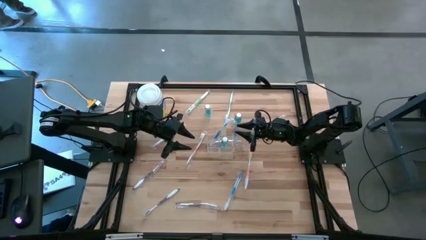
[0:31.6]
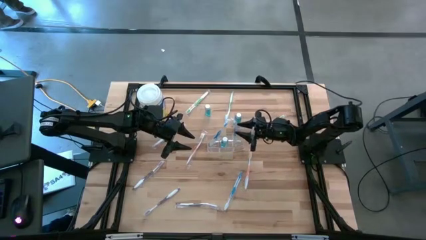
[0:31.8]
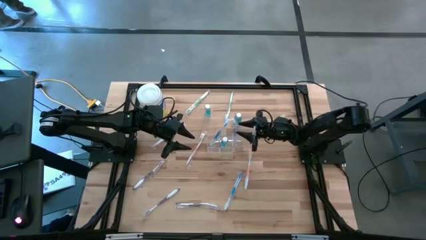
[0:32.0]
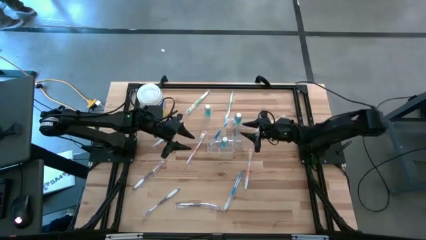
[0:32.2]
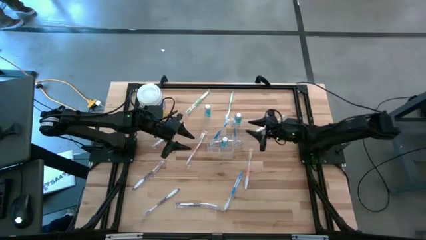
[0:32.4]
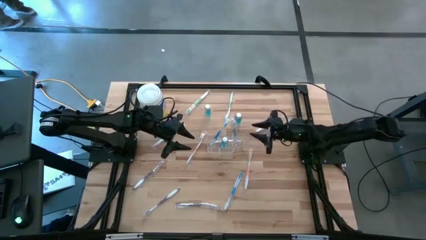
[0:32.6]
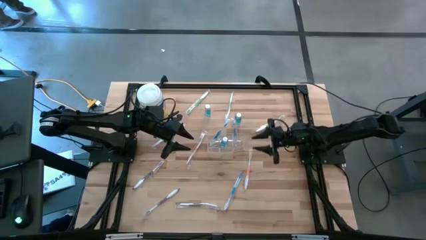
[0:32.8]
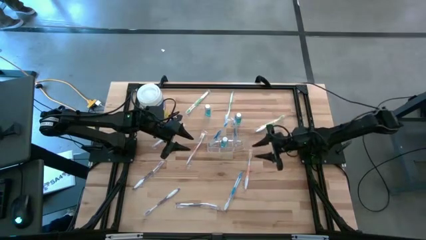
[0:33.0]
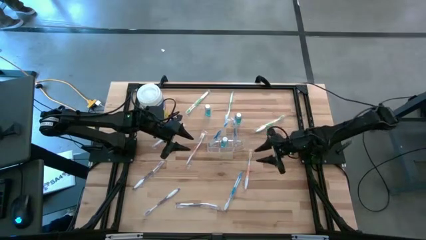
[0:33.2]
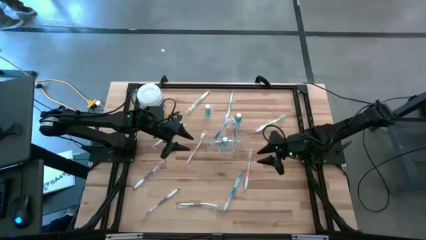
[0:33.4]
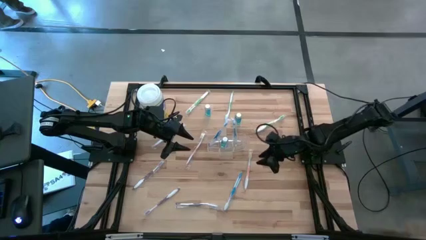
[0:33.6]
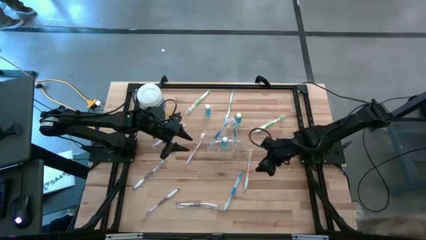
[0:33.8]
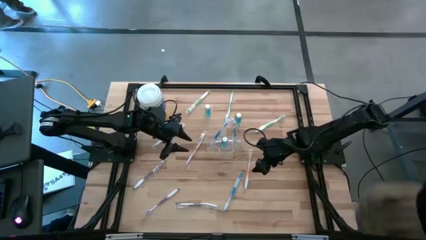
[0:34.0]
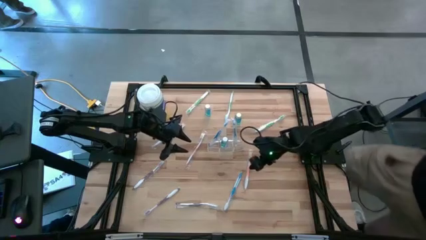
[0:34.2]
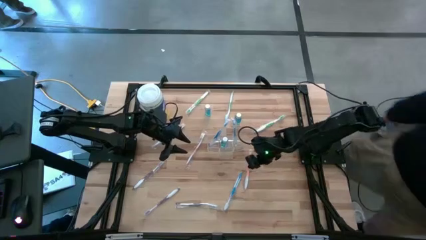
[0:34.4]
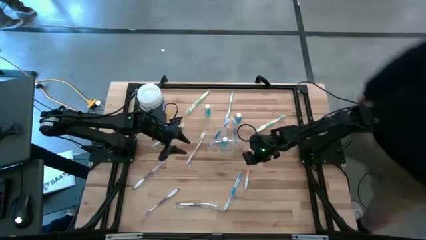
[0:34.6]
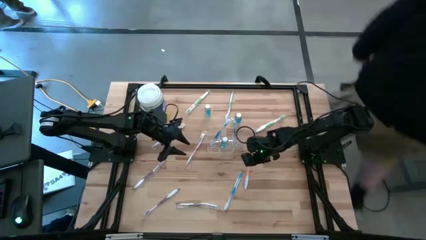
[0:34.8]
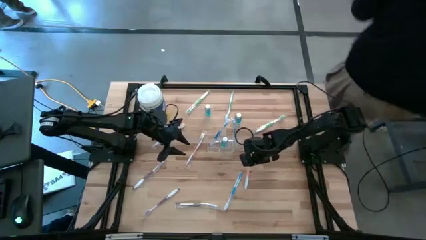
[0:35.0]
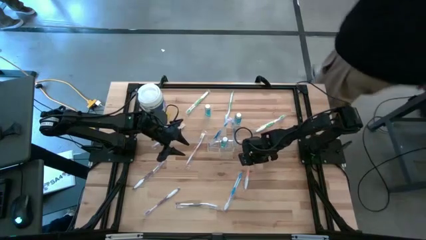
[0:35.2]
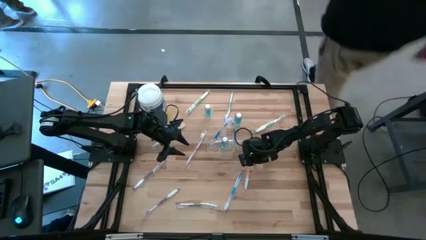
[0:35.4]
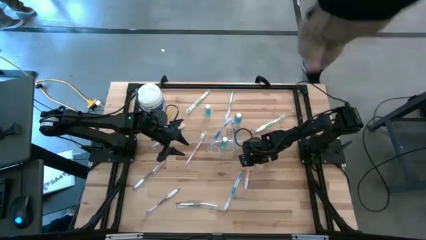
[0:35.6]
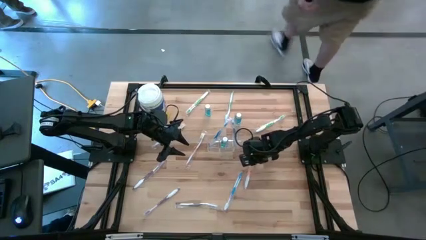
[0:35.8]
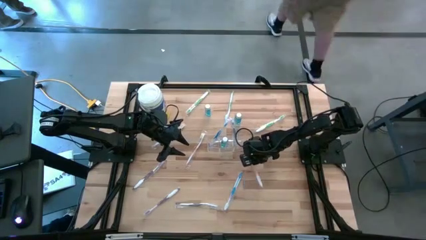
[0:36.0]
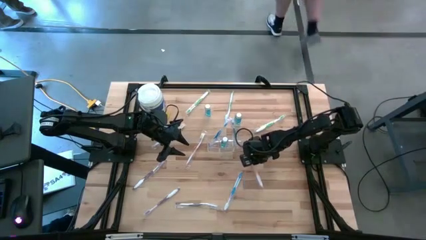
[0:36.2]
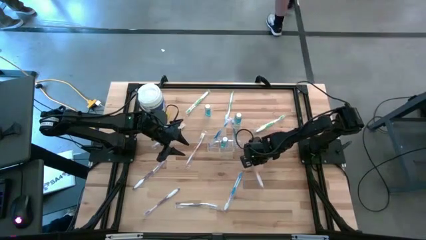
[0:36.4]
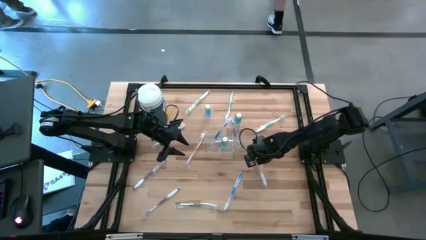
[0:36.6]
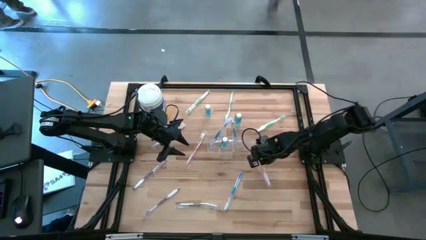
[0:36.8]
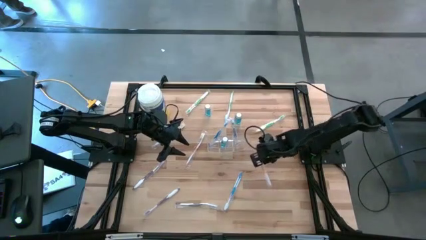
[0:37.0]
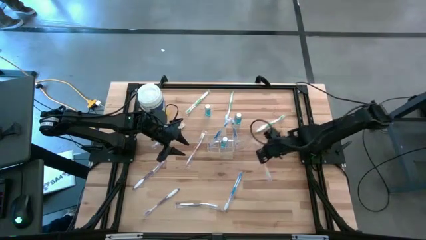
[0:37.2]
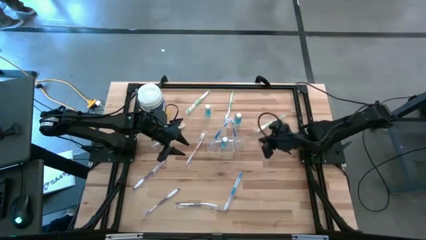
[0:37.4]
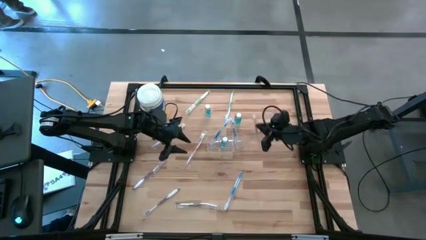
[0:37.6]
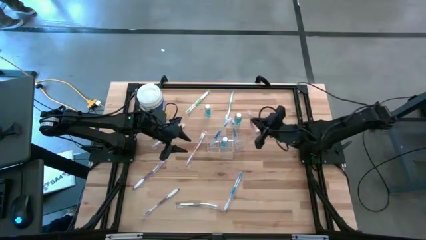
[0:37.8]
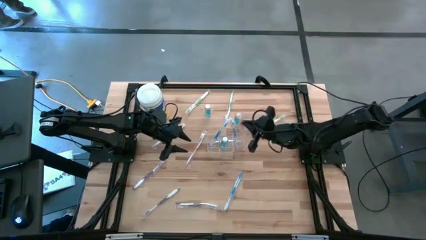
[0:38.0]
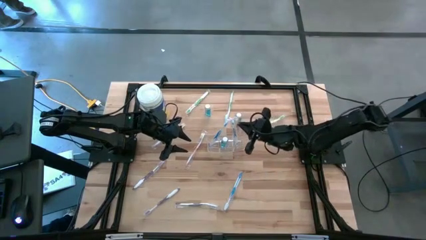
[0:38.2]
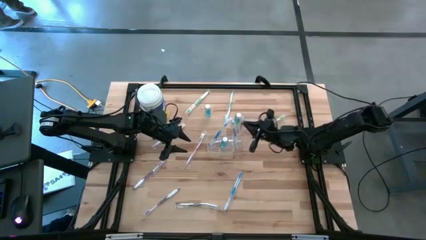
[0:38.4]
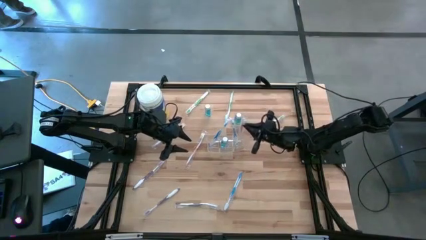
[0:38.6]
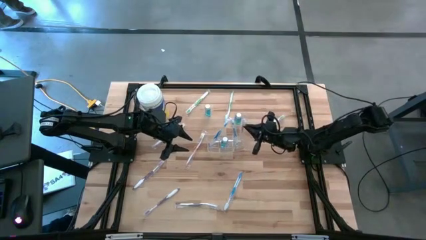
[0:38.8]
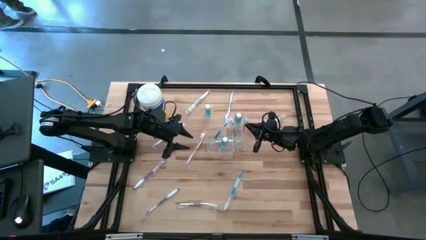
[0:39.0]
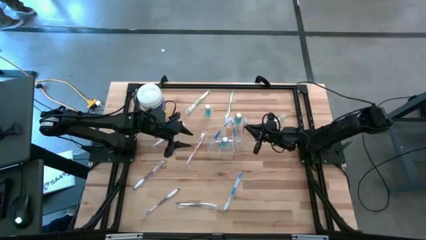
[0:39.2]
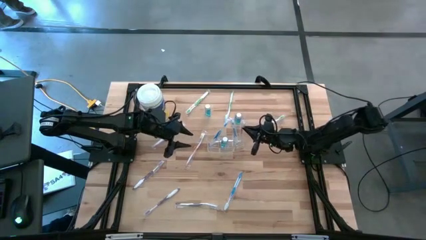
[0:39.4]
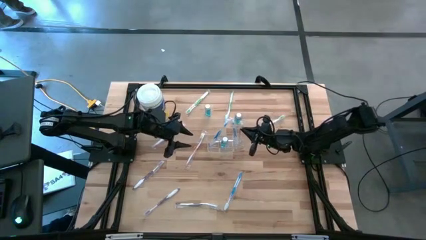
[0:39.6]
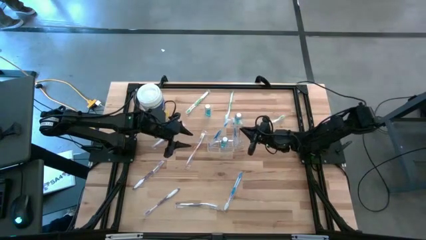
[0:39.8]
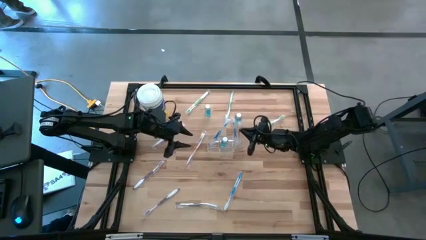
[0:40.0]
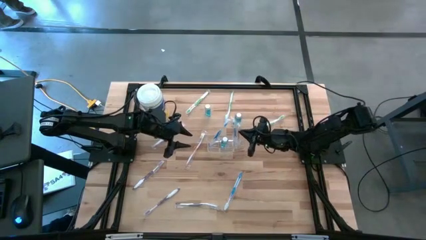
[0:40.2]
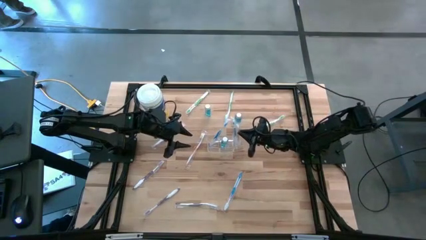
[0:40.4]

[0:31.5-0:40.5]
Task: Pick & Place toothbrushing station
Put the right orange toothbrush into the right section of the transparent organizer

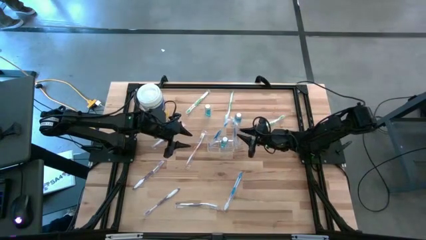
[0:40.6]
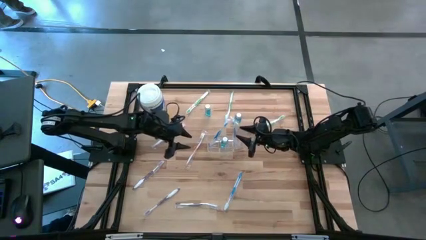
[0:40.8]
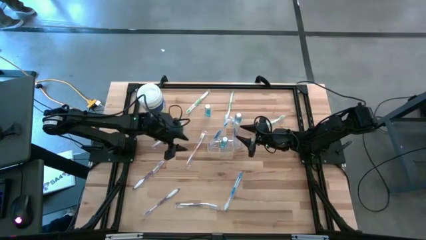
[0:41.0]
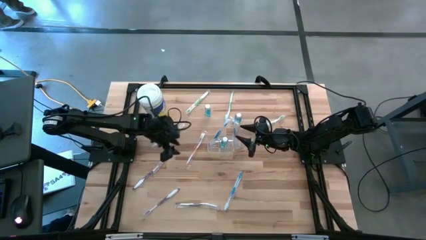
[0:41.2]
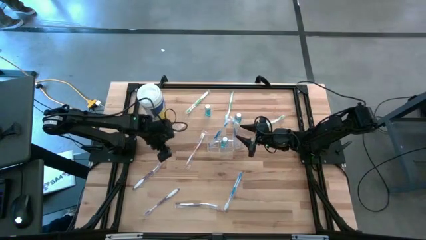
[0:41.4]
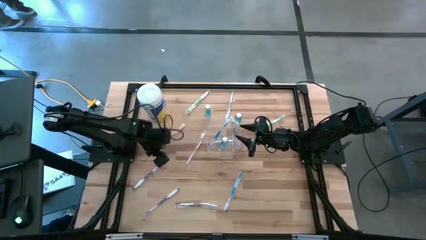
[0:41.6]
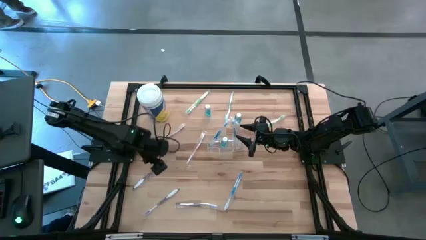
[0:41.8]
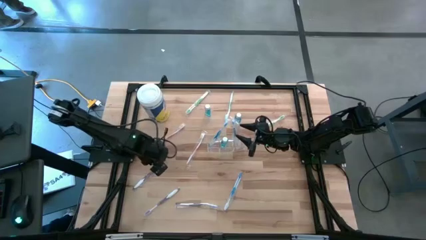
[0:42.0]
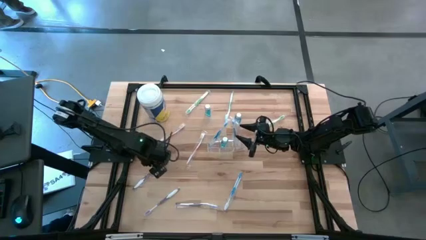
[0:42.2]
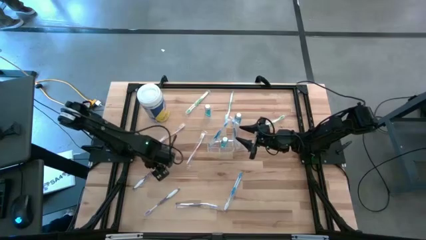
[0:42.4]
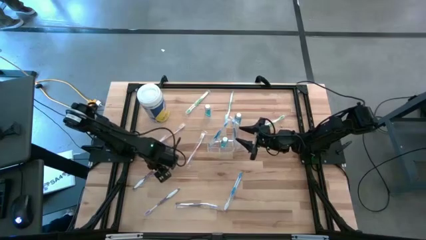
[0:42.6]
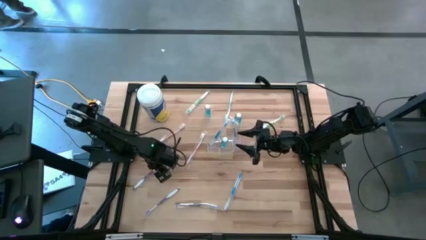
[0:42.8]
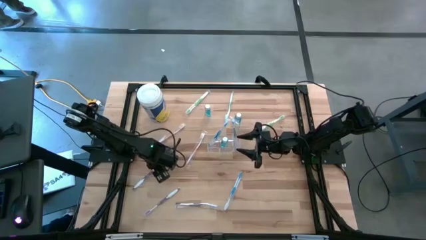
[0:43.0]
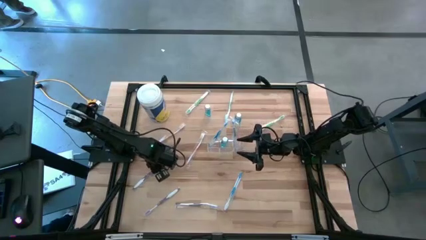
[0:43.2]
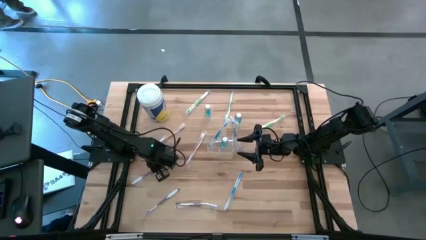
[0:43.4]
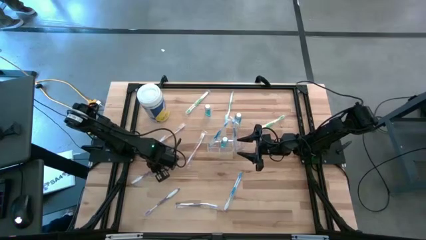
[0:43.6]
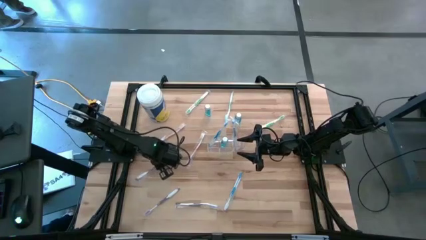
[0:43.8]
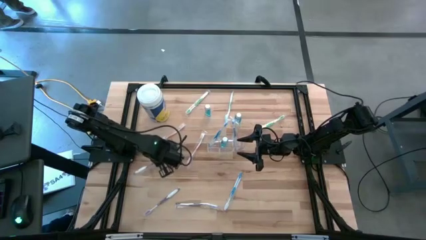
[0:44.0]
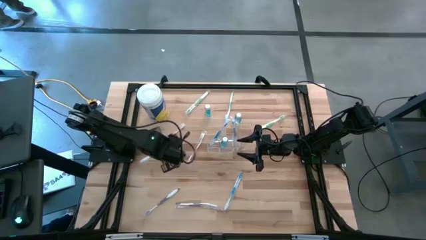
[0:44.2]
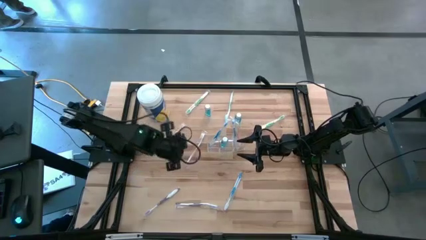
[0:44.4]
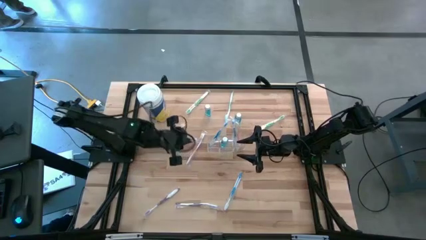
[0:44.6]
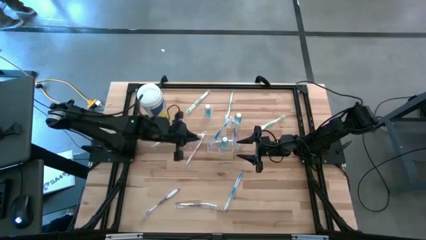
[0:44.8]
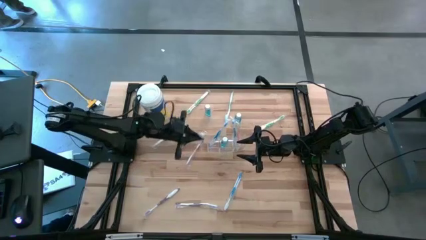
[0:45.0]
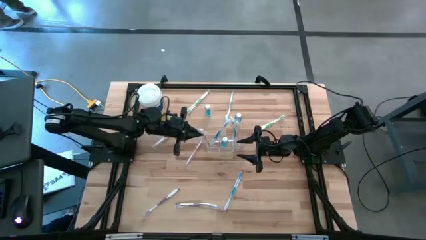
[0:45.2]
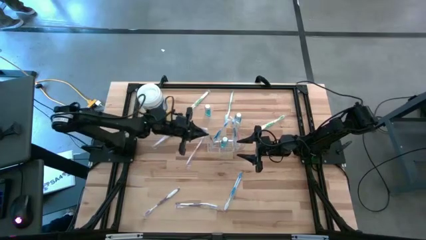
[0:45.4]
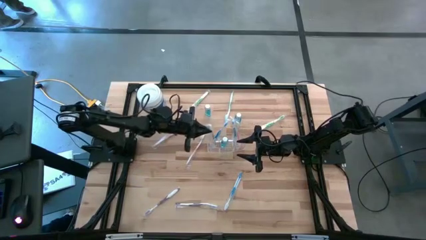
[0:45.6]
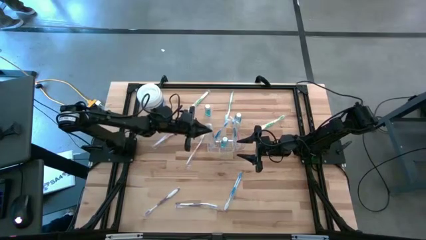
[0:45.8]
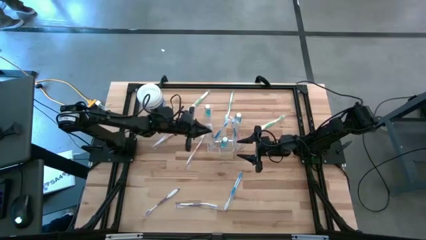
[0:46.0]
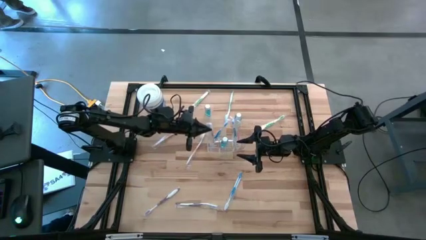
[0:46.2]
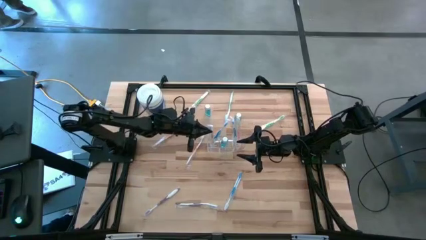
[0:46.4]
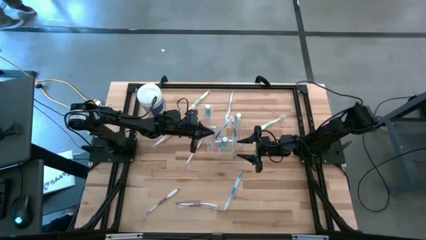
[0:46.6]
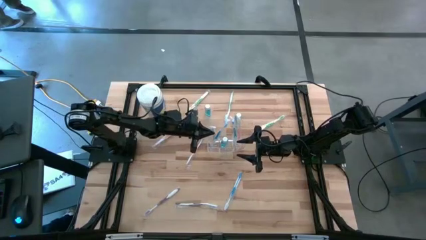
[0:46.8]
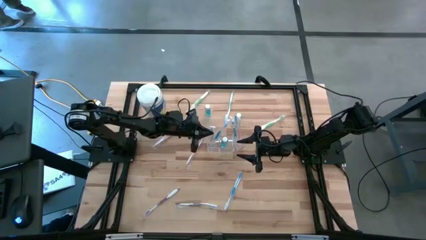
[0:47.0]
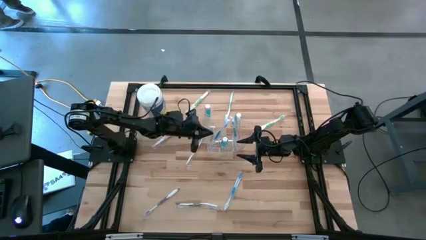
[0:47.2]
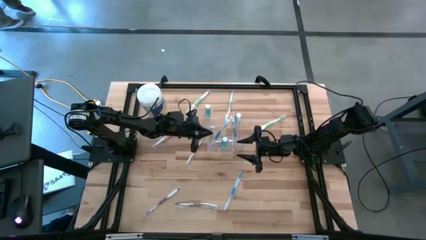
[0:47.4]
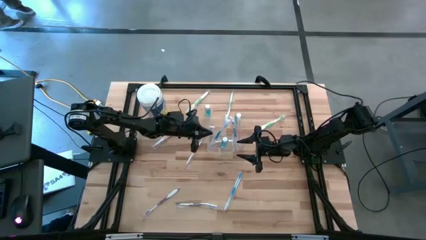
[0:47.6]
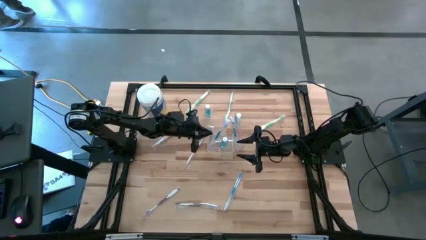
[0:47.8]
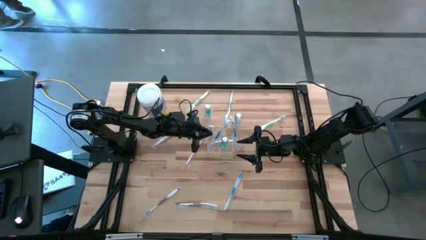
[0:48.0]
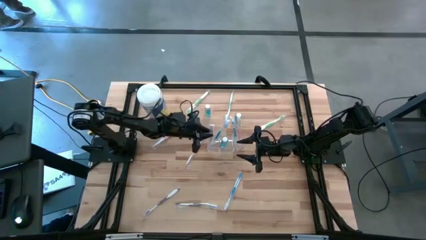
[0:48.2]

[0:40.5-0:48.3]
Put the top violet toothbrush into the left section of the transparent organizer
